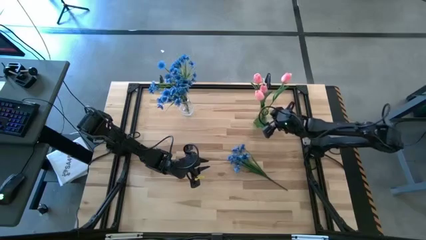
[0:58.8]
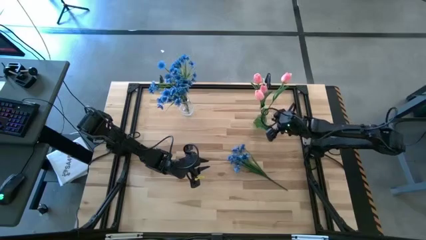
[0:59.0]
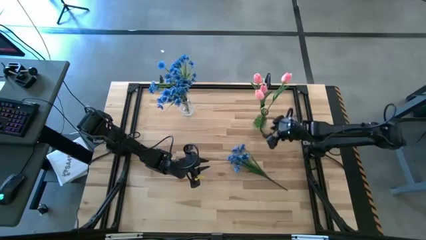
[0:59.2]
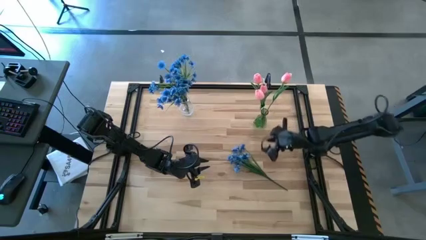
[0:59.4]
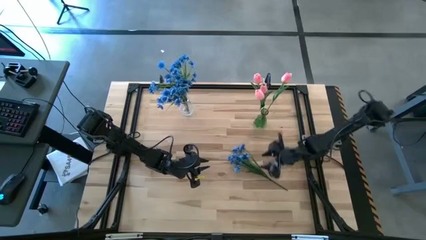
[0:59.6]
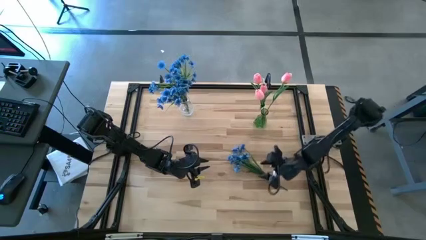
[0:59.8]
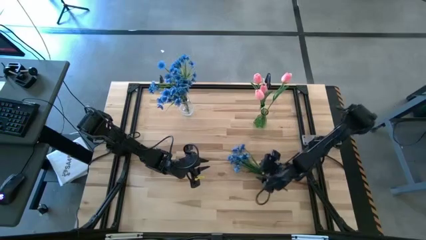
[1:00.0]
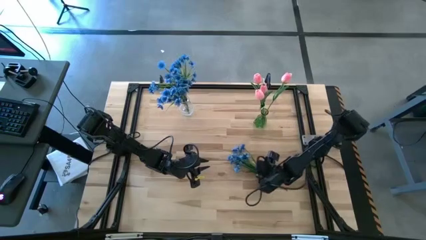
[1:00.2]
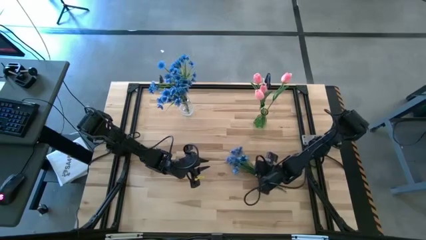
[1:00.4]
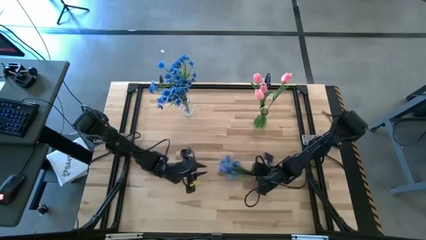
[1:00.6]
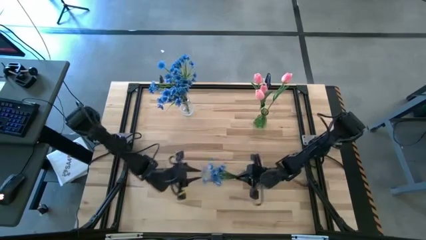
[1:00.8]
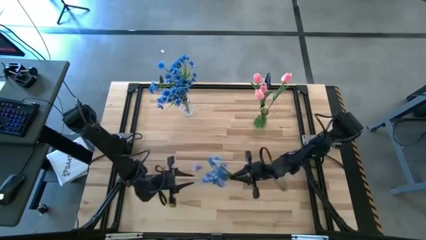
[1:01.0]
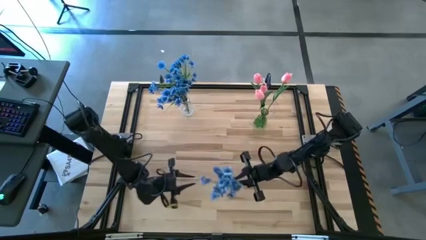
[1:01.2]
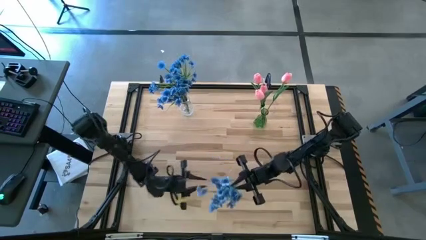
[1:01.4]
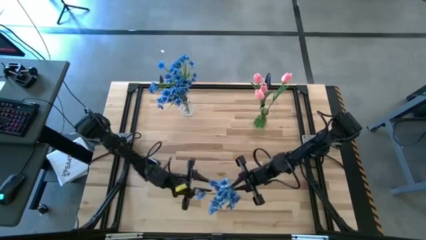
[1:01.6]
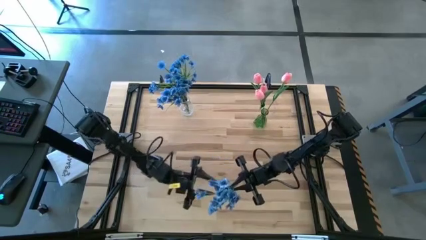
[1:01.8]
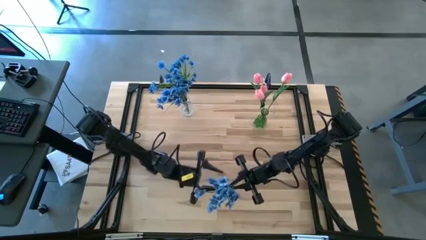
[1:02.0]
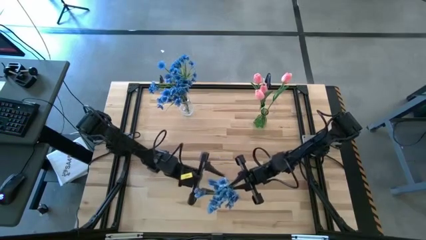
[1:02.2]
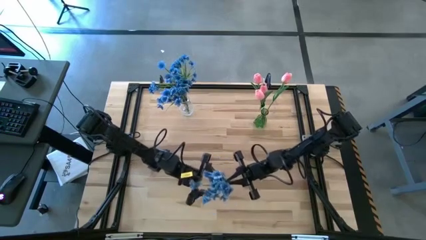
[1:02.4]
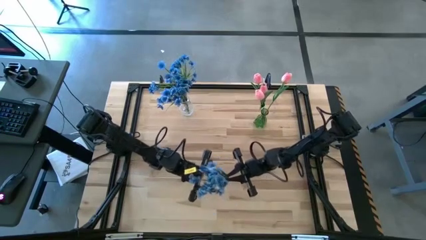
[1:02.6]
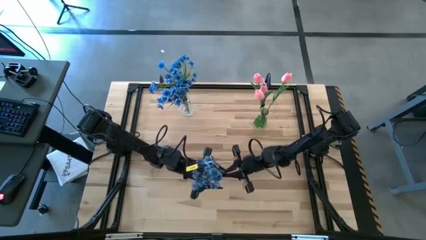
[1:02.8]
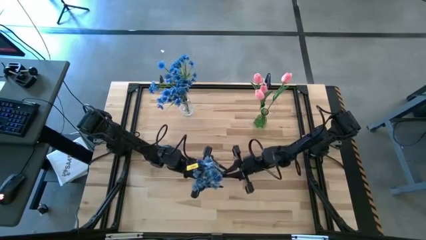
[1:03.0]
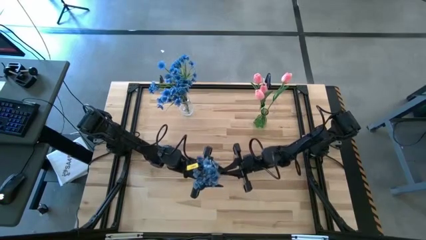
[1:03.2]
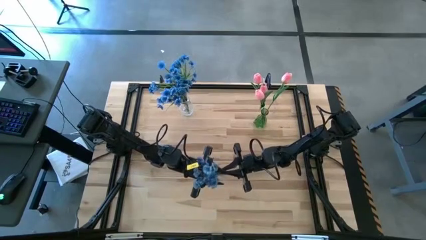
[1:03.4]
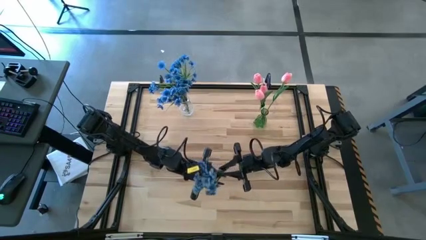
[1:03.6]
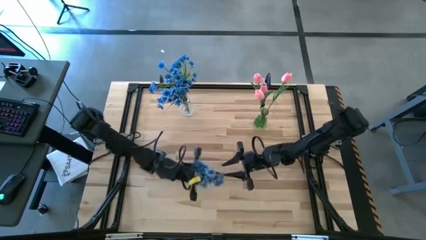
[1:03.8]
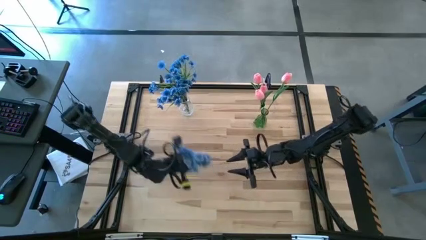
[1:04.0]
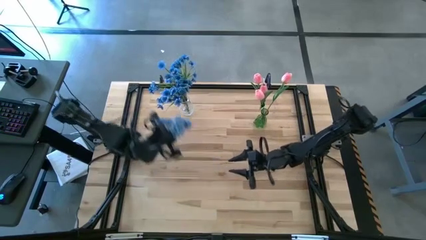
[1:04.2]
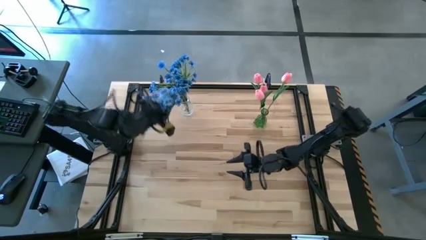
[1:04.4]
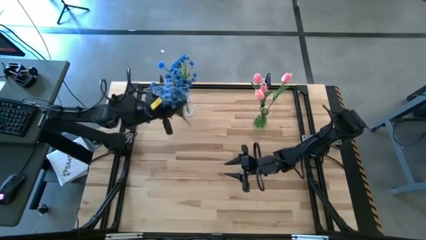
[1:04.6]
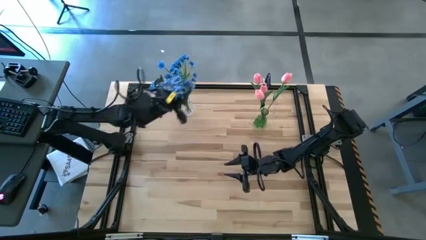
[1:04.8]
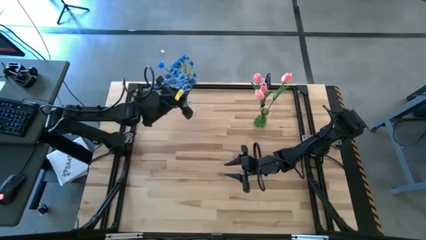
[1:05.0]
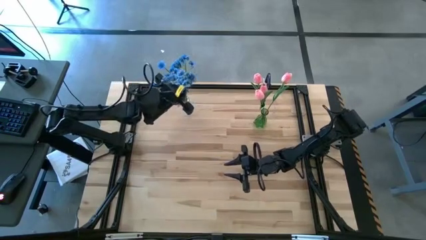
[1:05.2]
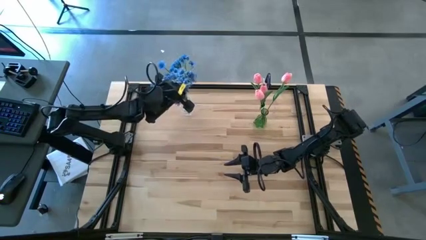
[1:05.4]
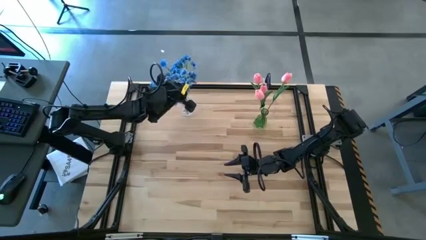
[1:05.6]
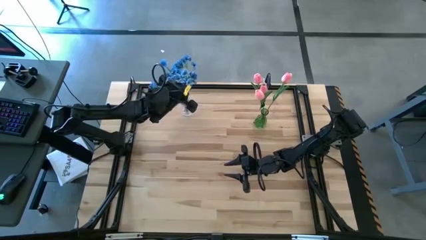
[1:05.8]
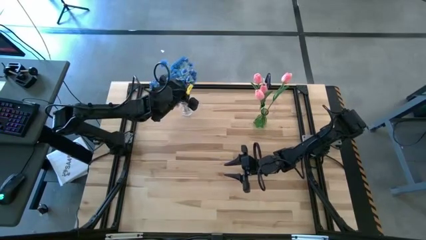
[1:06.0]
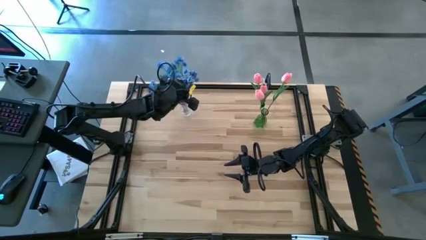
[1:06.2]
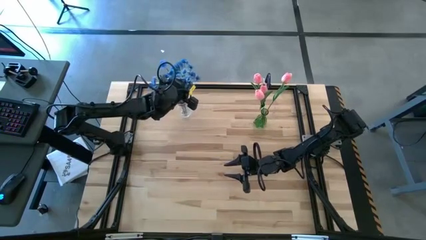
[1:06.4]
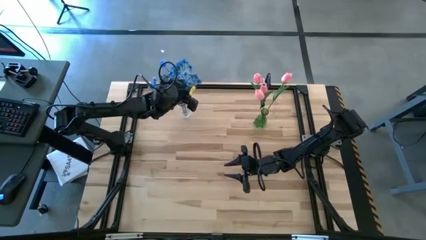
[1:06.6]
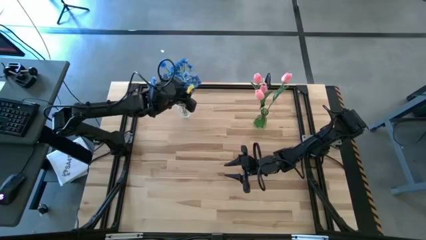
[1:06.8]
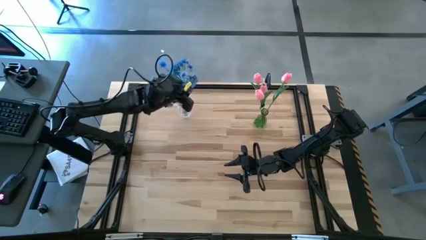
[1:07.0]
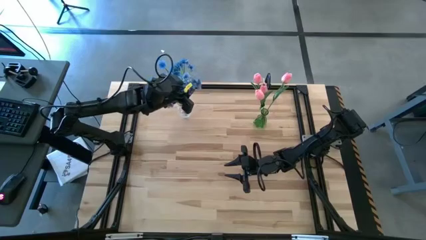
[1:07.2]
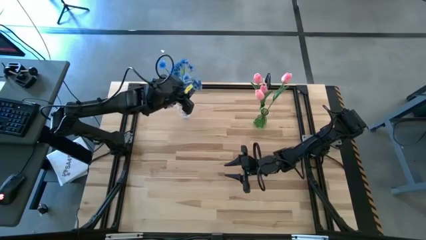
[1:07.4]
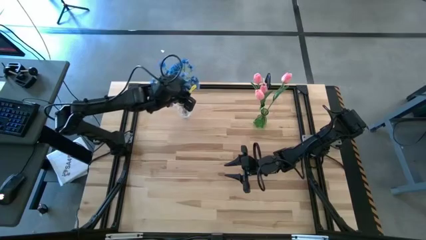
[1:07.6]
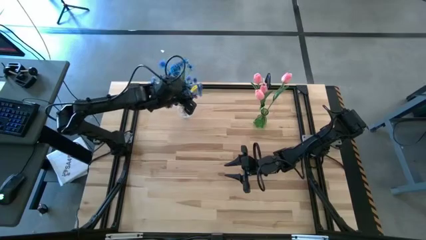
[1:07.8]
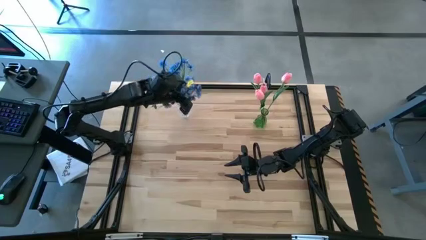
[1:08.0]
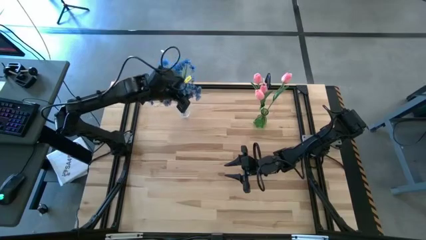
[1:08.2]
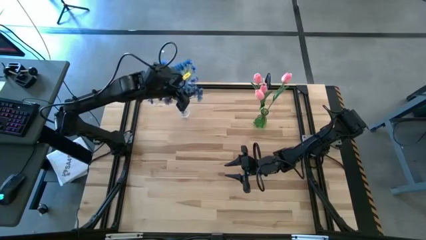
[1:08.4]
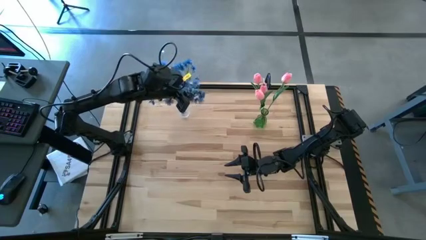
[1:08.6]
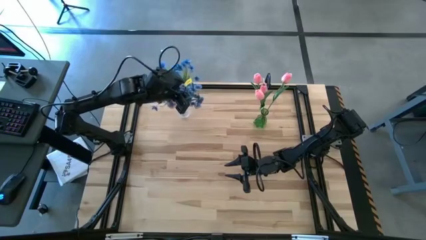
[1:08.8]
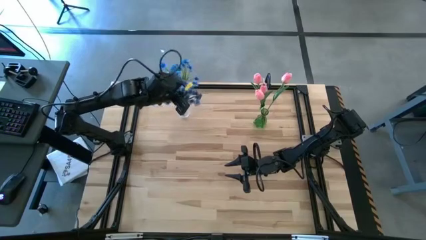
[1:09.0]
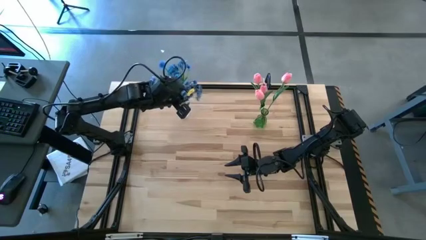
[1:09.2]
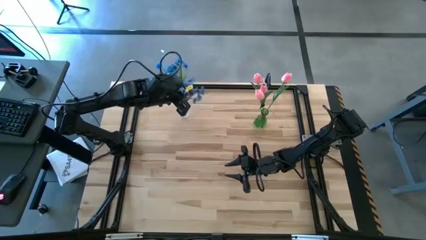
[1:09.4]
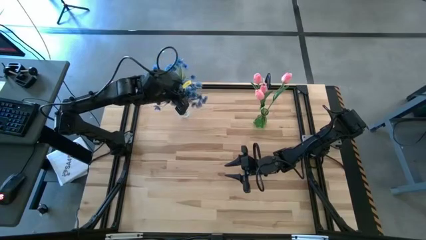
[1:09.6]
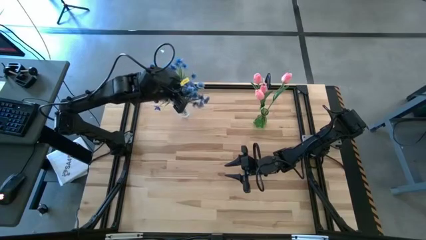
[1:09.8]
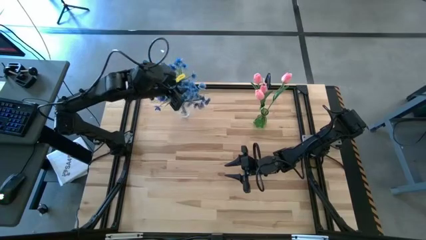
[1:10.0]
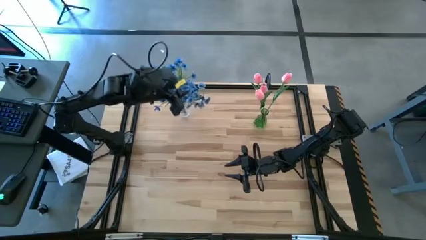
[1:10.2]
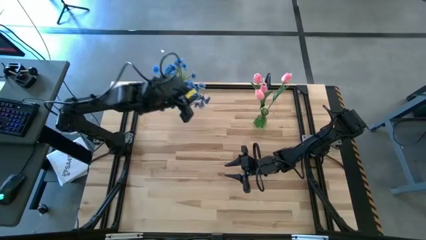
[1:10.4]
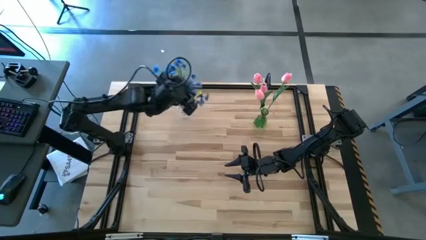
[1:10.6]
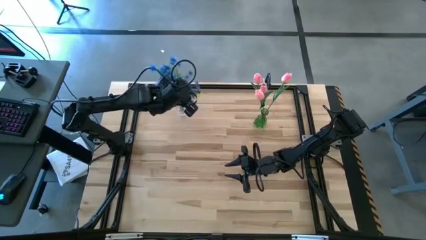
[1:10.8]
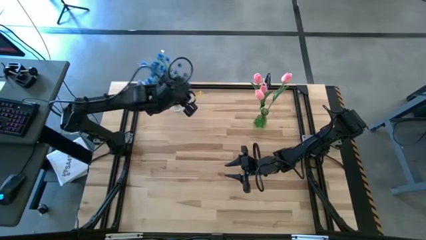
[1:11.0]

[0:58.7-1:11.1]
Task: Sort flowers into vase by color
Put the blue flowers into the transparent vase
